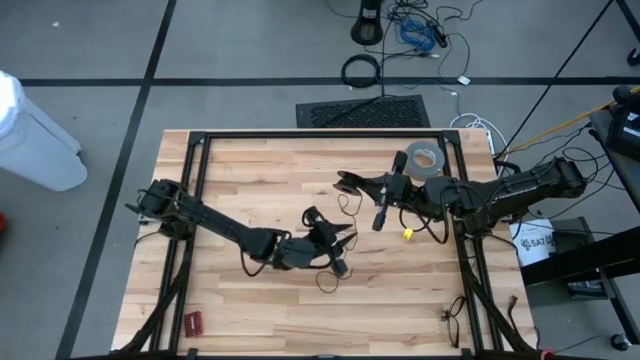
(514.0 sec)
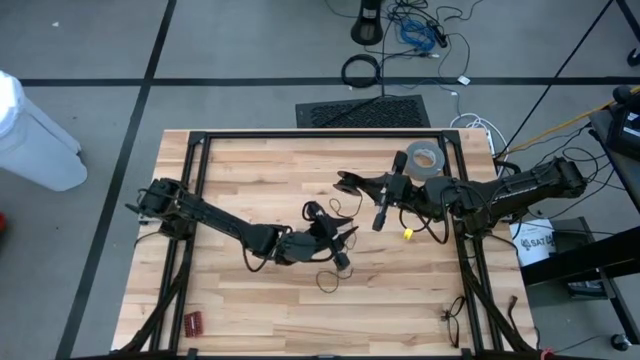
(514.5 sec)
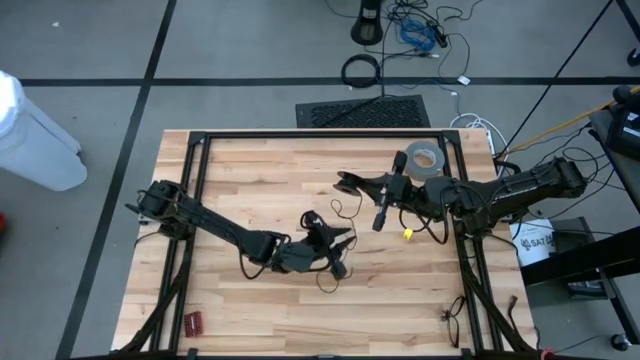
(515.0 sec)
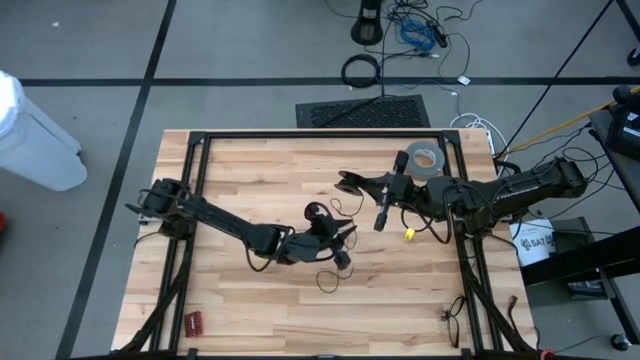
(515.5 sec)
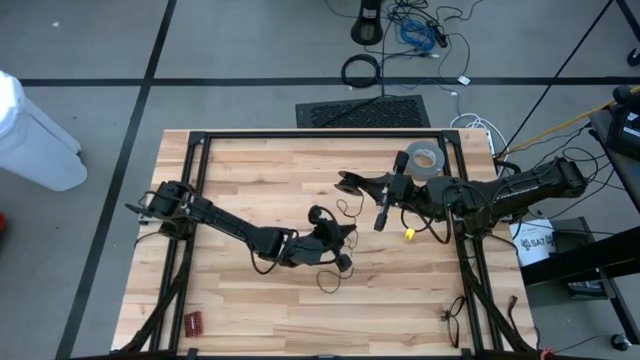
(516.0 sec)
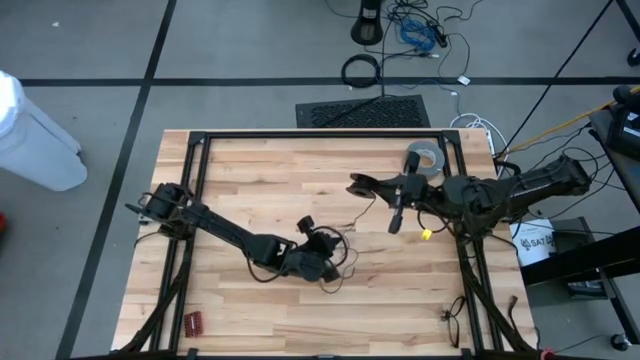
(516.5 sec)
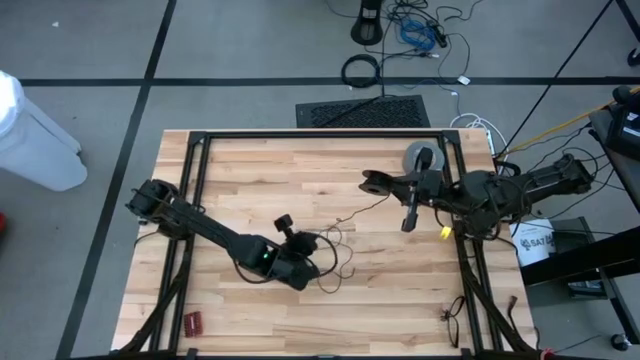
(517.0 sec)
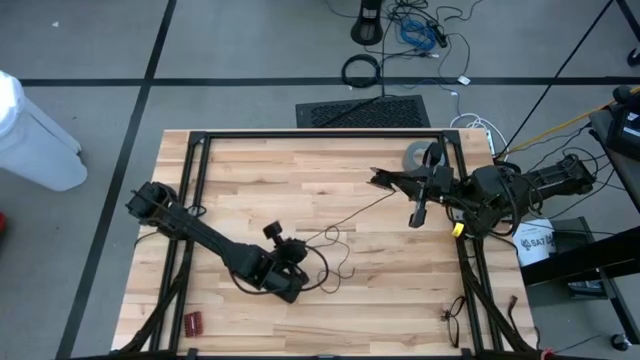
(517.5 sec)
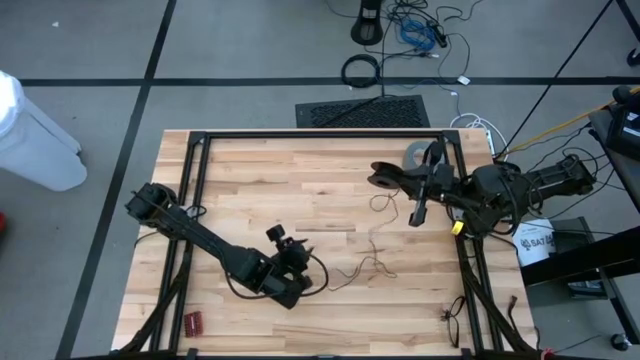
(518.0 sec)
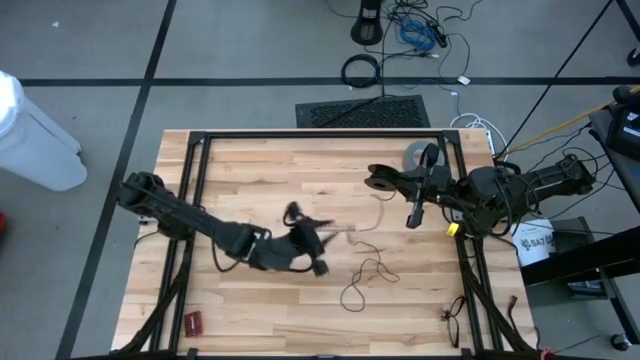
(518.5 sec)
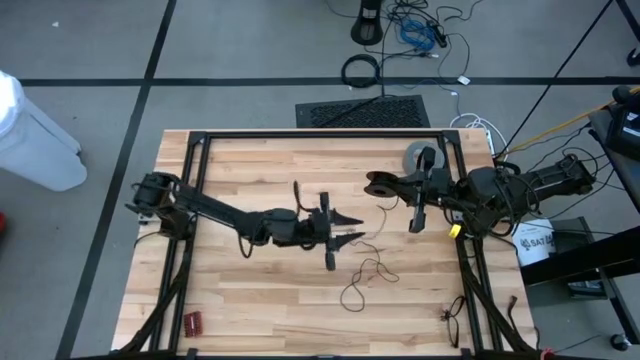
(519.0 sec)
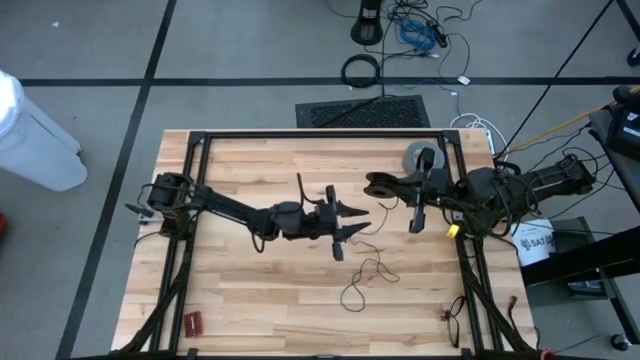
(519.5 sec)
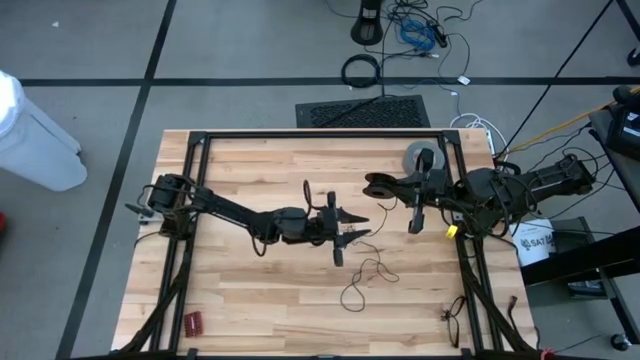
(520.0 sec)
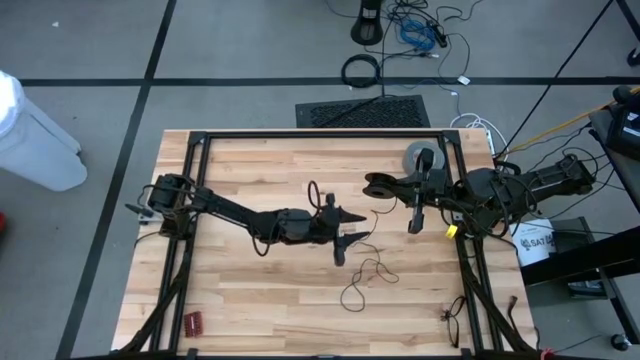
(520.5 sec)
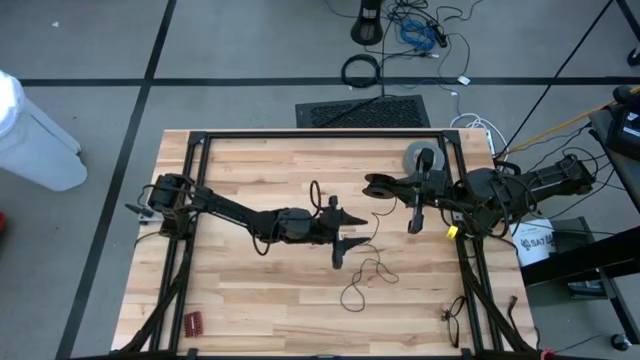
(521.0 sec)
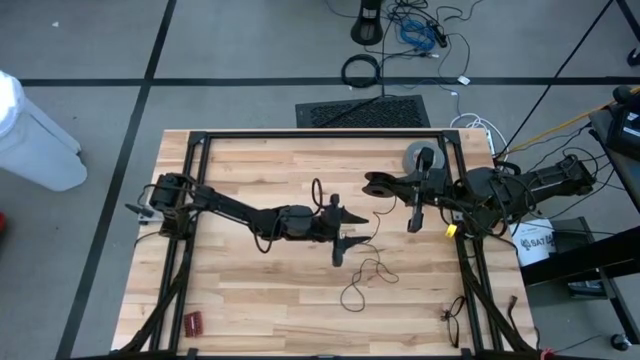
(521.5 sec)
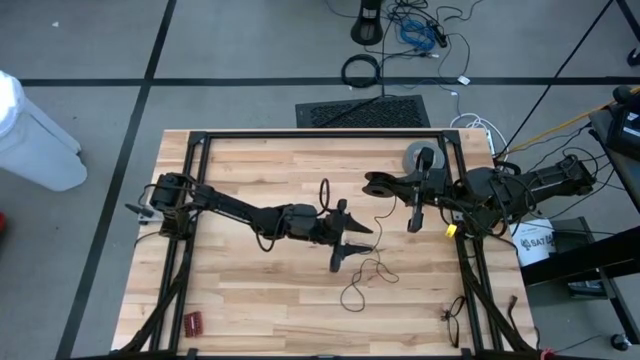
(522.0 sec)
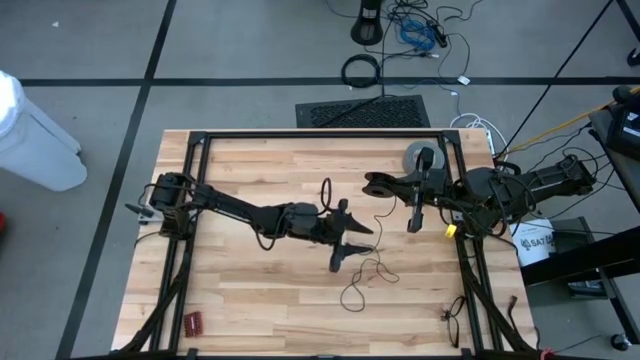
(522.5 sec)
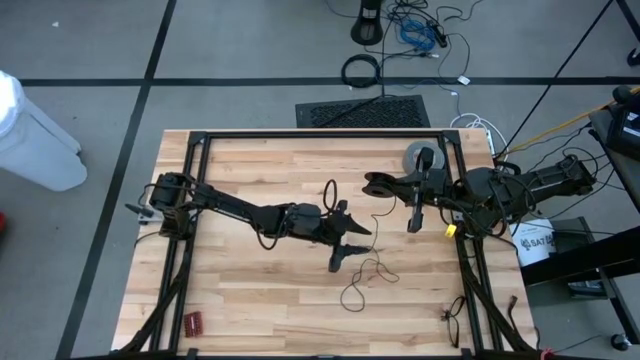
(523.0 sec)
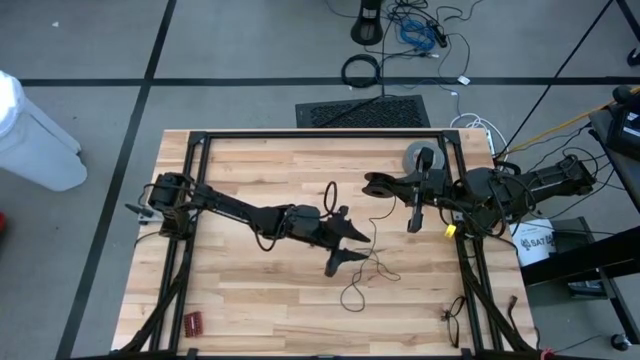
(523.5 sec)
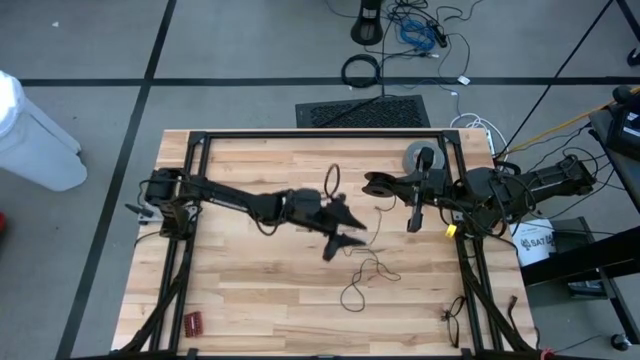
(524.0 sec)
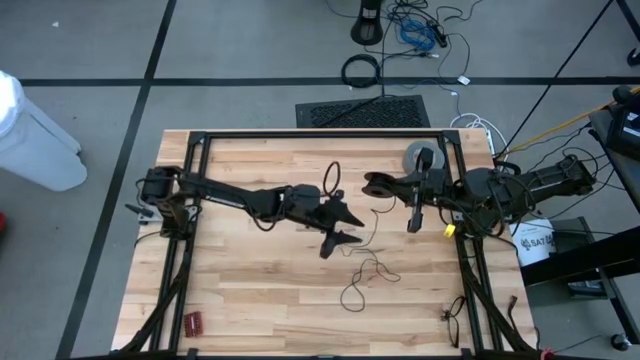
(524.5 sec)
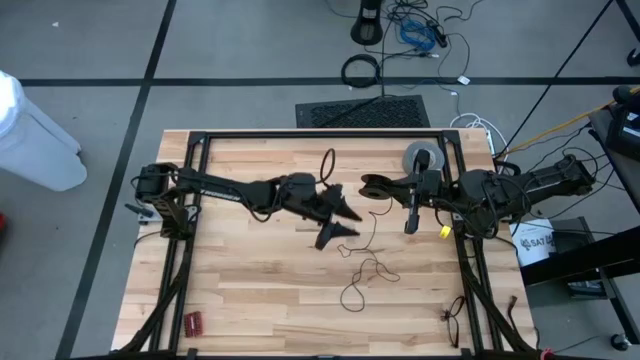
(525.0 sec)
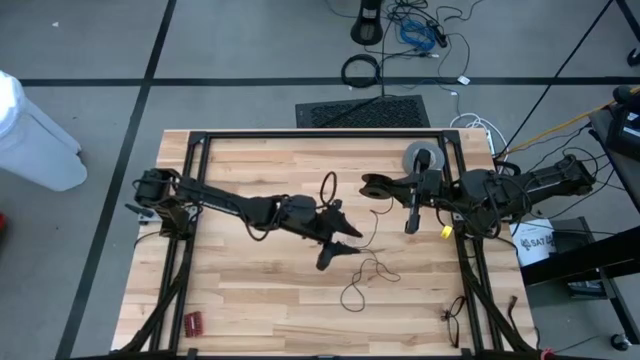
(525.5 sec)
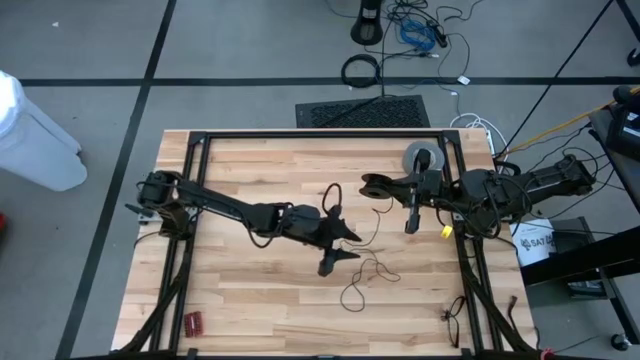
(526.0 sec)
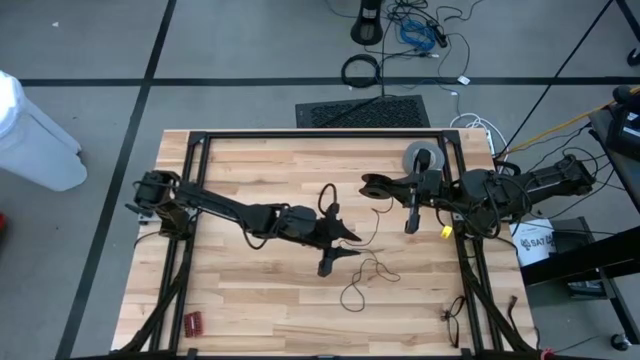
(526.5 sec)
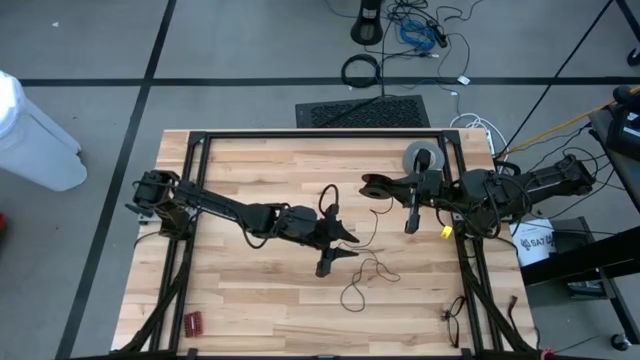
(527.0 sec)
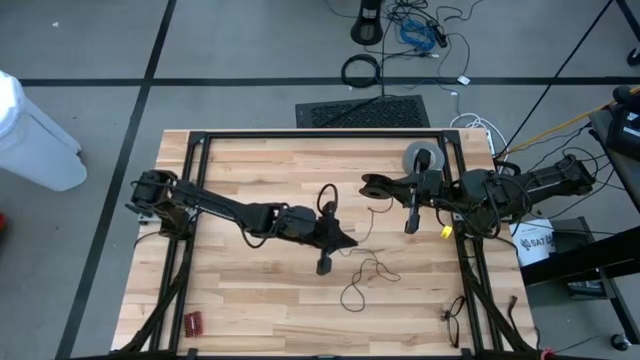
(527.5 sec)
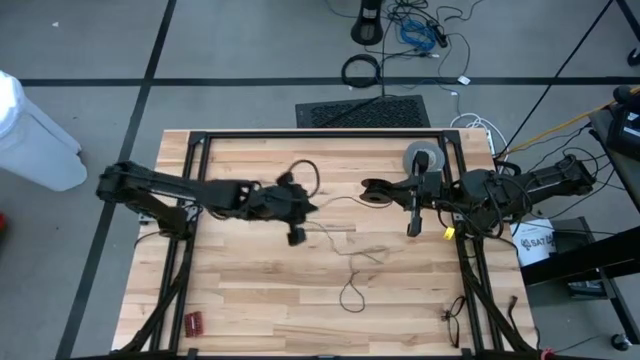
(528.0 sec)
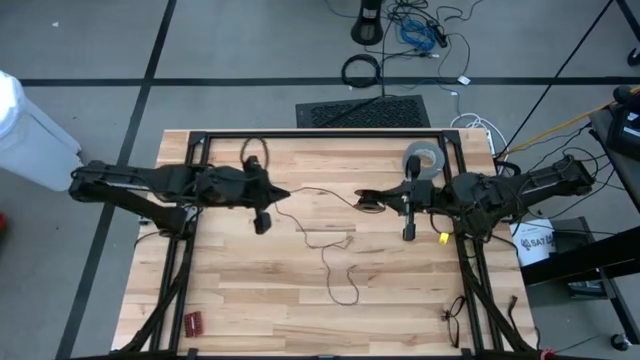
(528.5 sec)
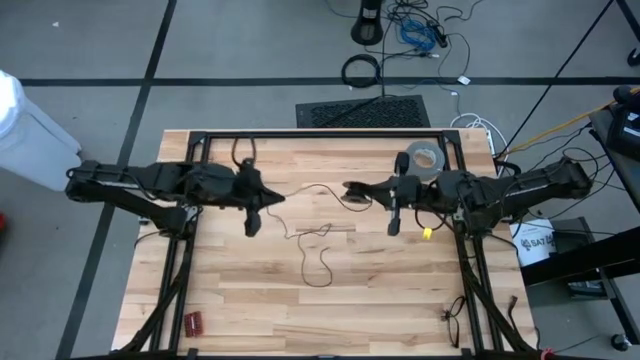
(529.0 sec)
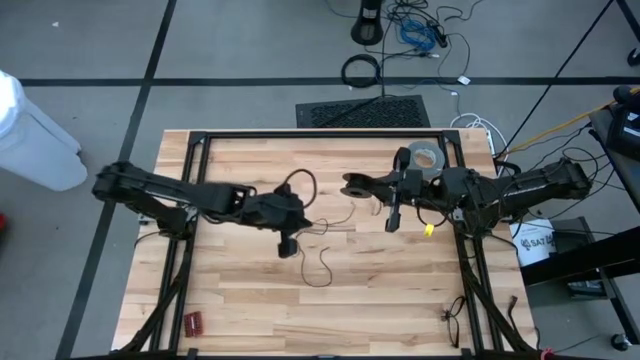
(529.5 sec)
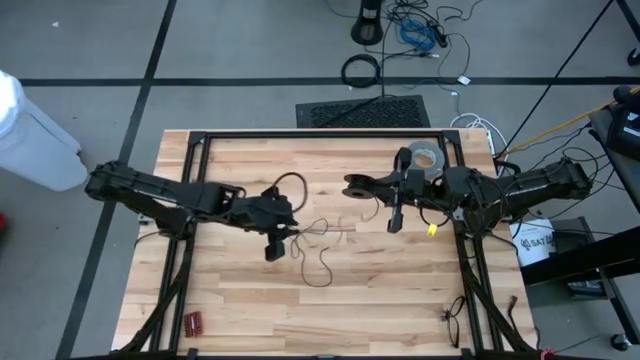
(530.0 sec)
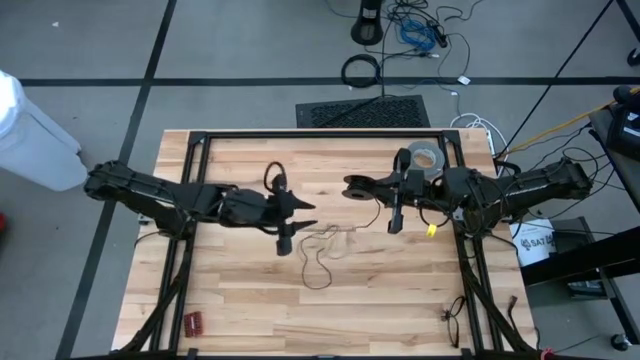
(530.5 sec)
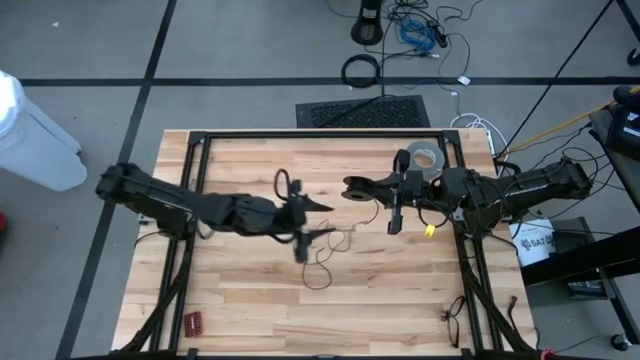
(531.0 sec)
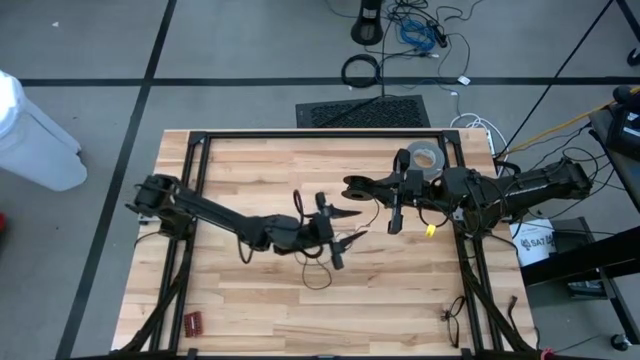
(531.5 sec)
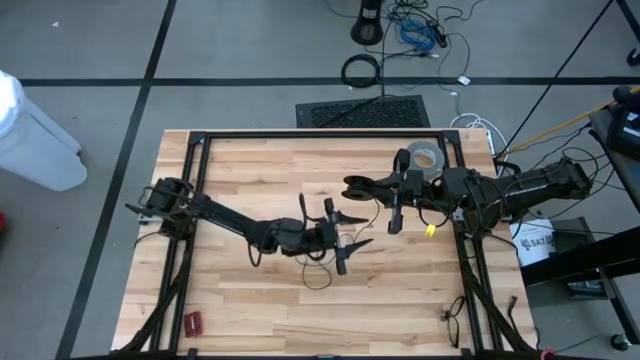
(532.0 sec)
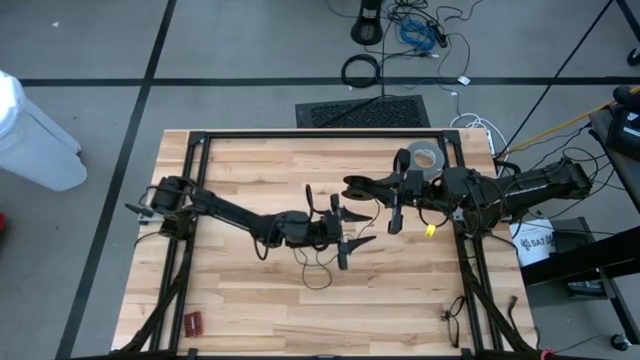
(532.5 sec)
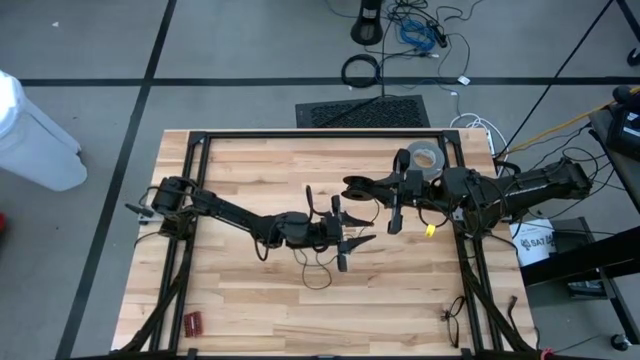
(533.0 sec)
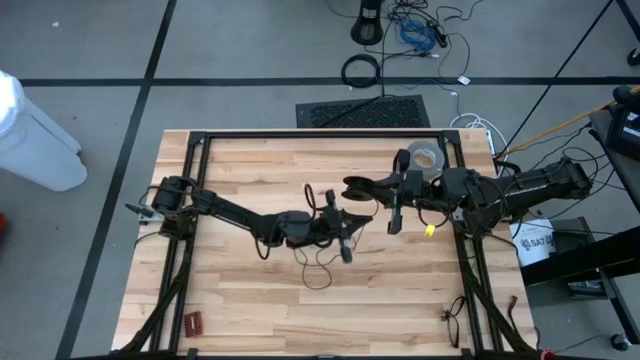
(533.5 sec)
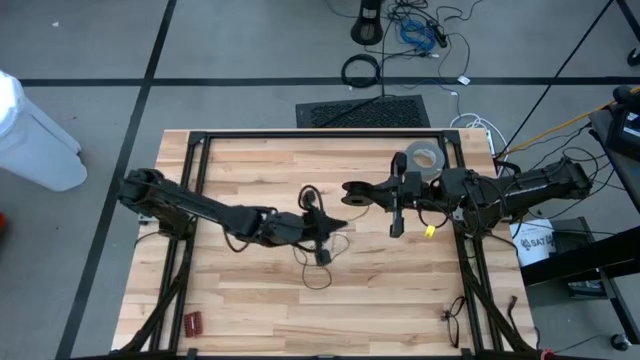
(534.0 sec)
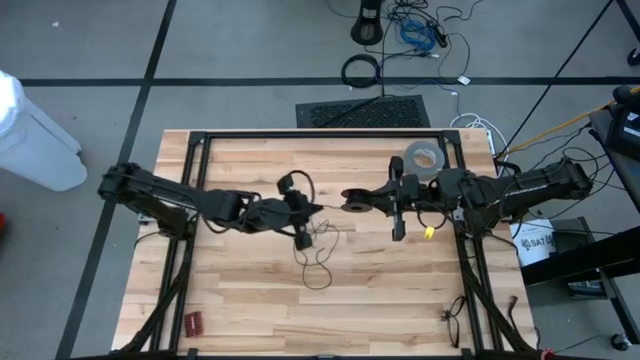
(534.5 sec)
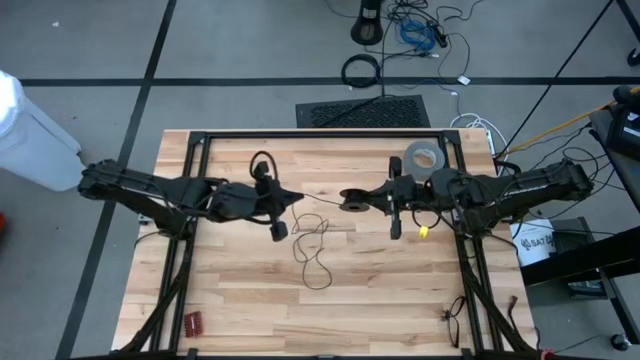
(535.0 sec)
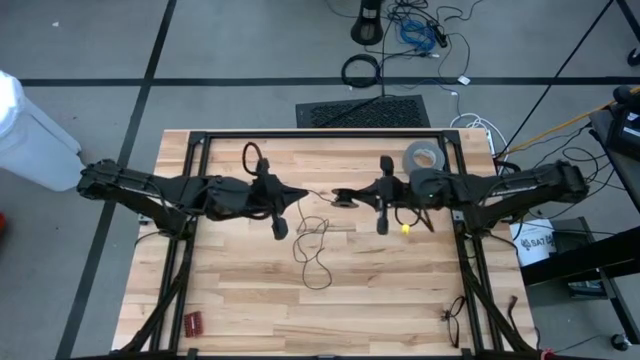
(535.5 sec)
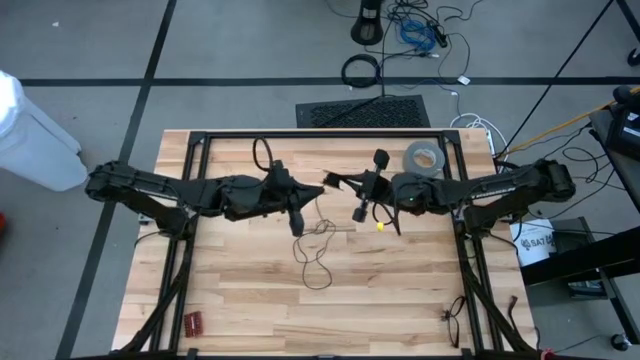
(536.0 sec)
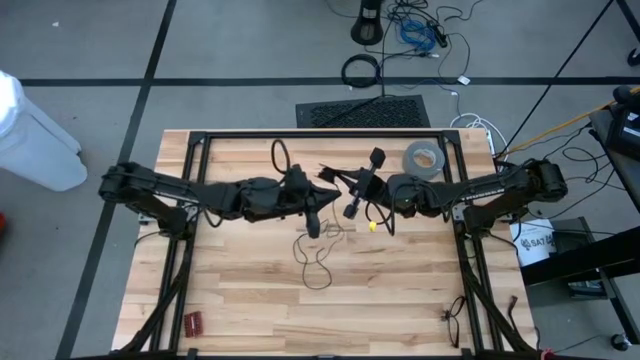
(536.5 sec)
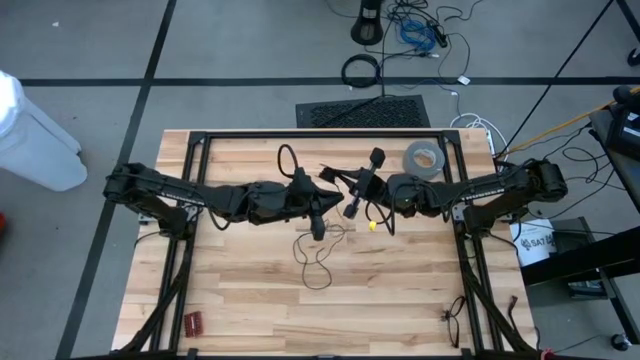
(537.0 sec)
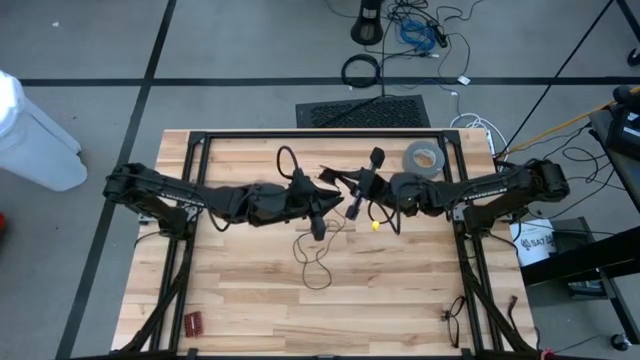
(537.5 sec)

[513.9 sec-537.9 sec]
Task: Coil cords
Coil the black wire onto the spool
